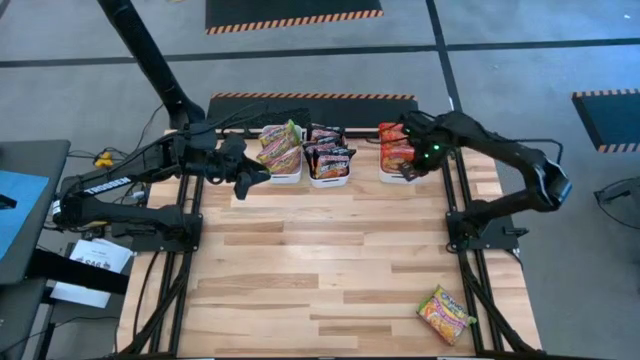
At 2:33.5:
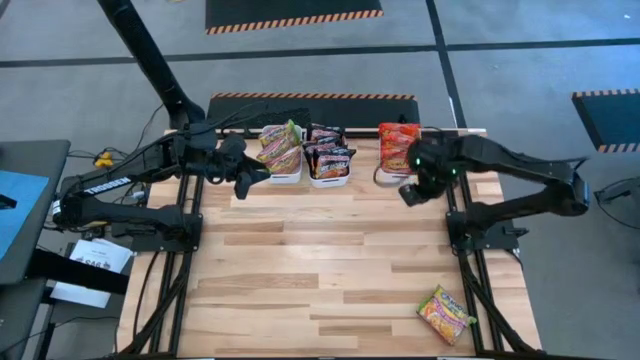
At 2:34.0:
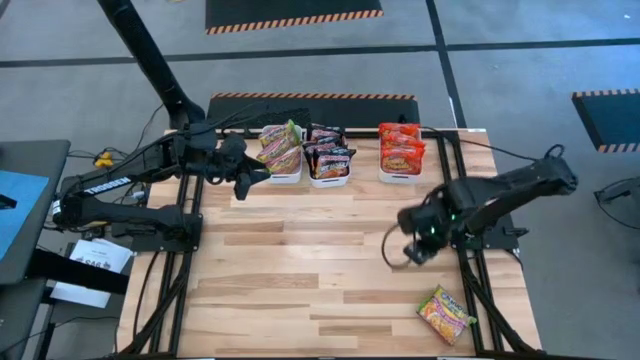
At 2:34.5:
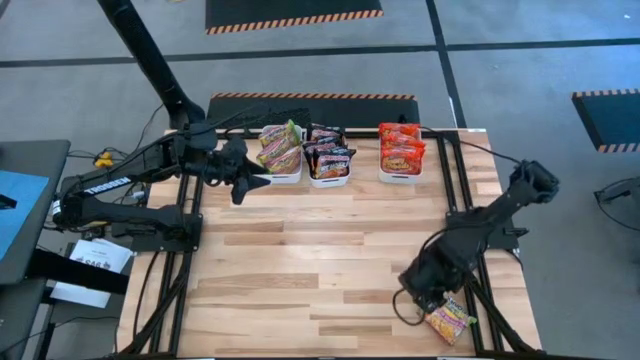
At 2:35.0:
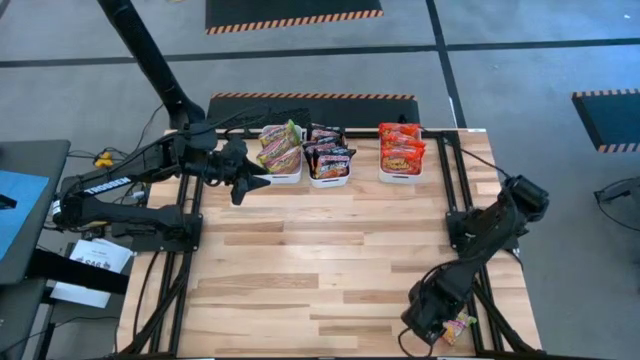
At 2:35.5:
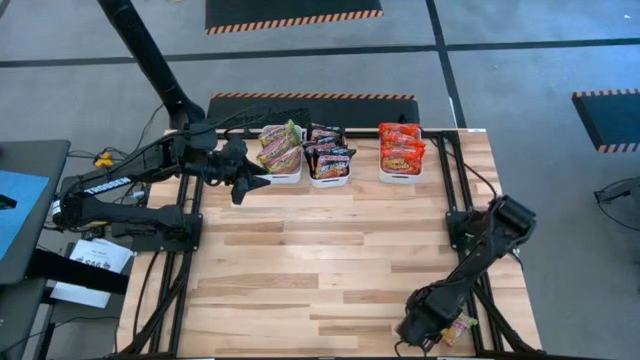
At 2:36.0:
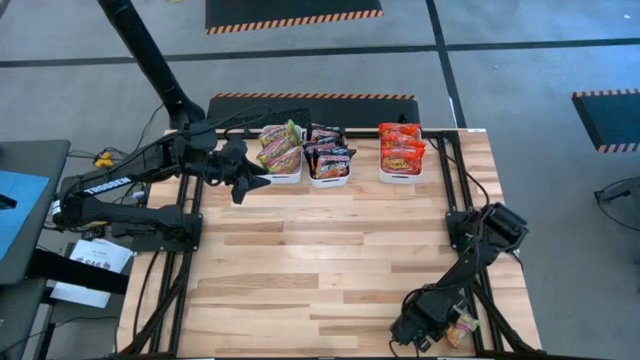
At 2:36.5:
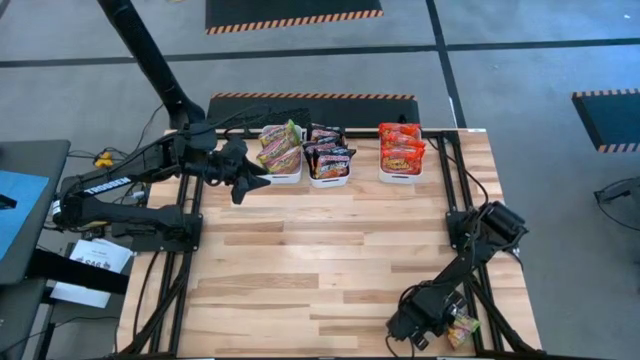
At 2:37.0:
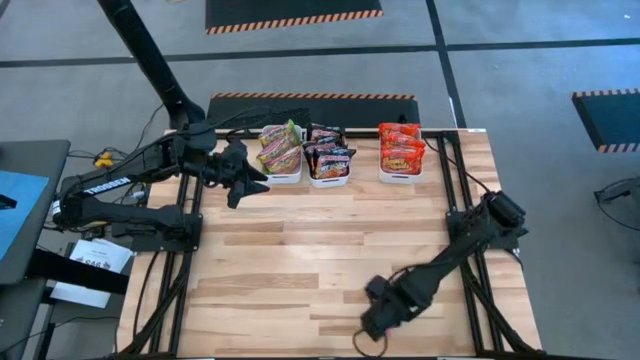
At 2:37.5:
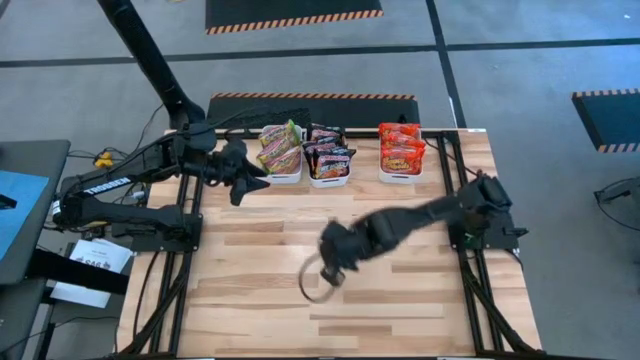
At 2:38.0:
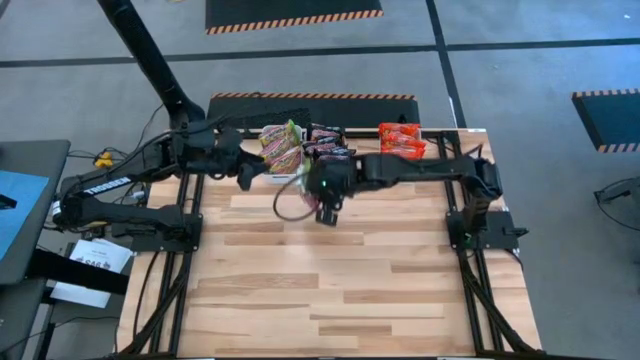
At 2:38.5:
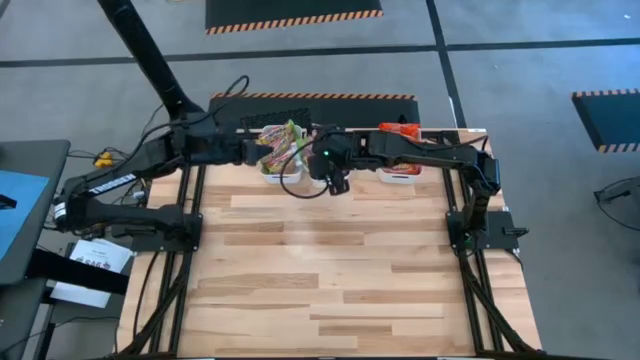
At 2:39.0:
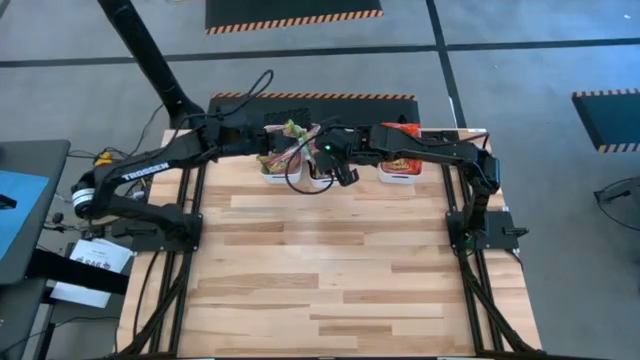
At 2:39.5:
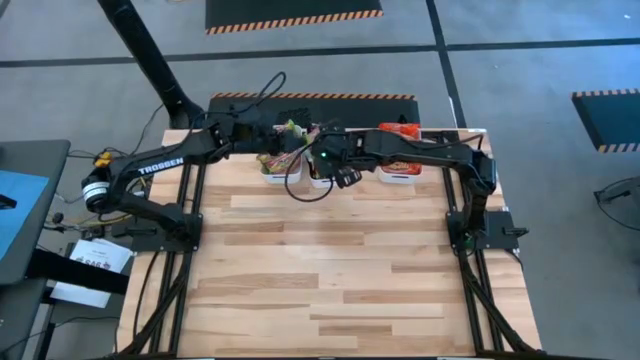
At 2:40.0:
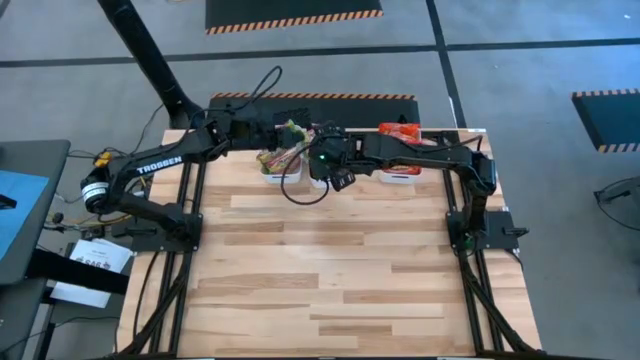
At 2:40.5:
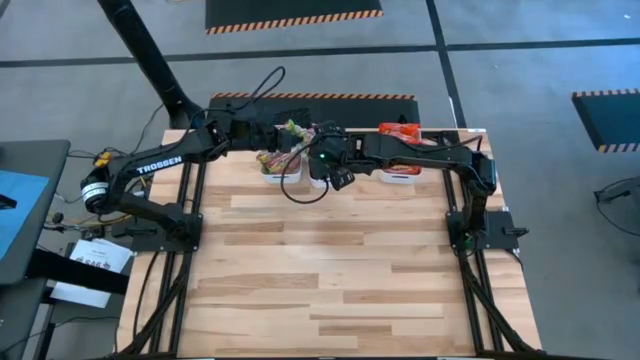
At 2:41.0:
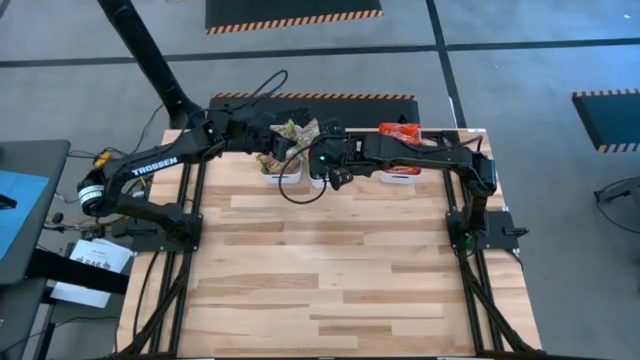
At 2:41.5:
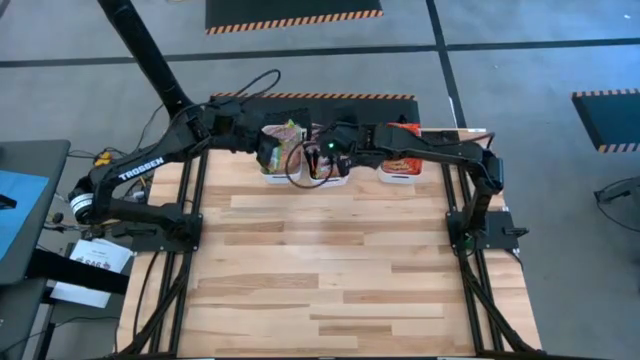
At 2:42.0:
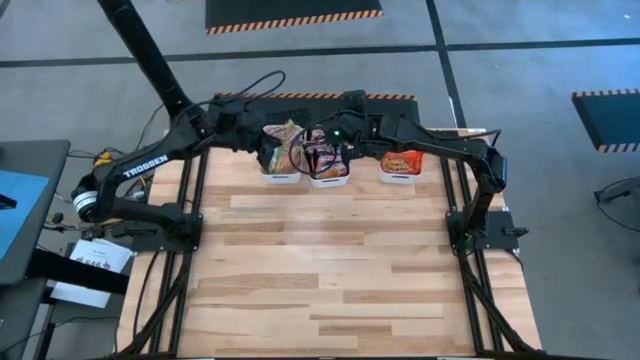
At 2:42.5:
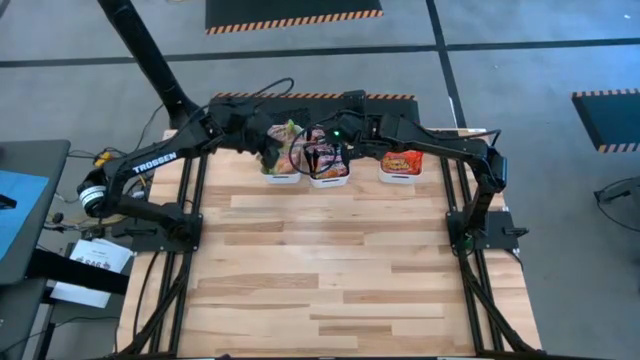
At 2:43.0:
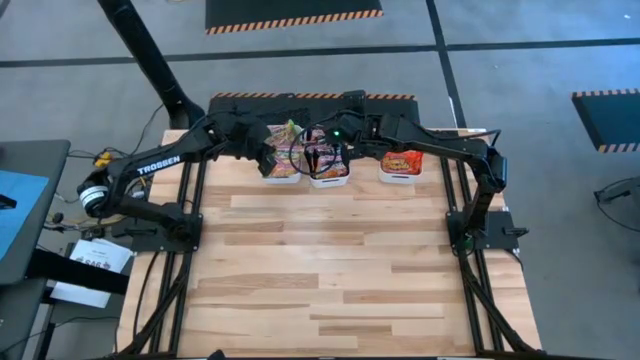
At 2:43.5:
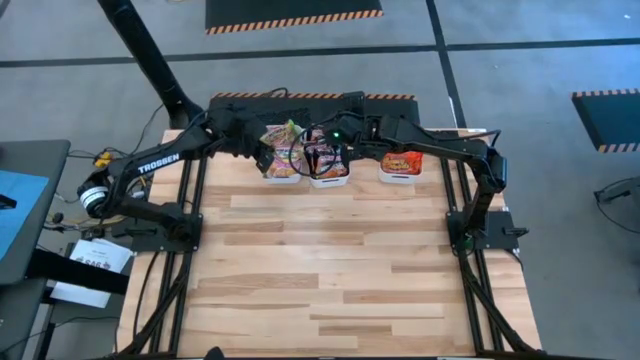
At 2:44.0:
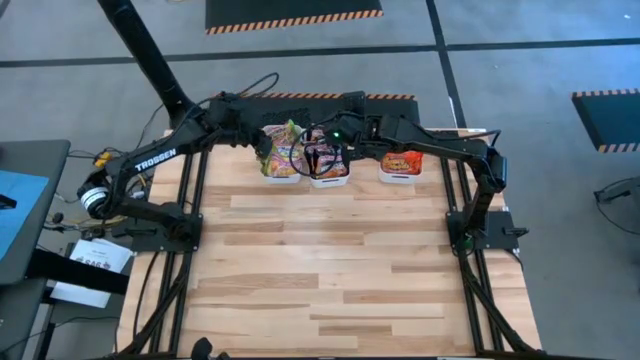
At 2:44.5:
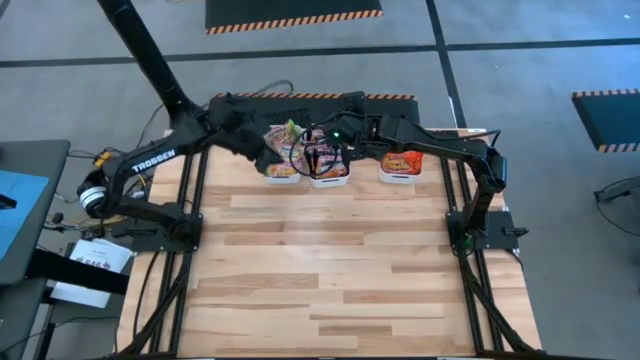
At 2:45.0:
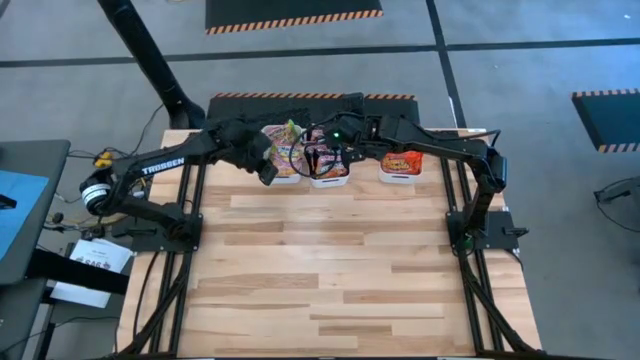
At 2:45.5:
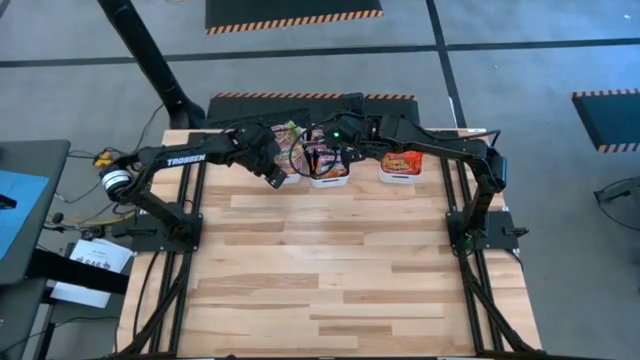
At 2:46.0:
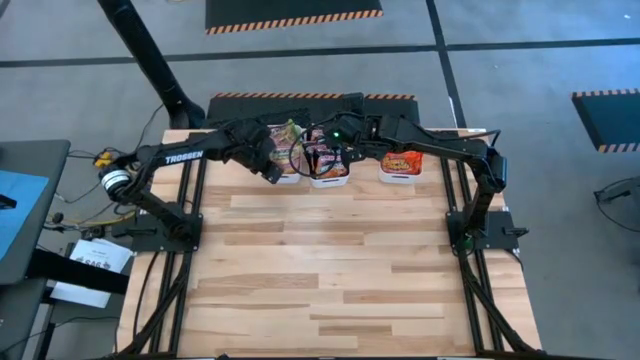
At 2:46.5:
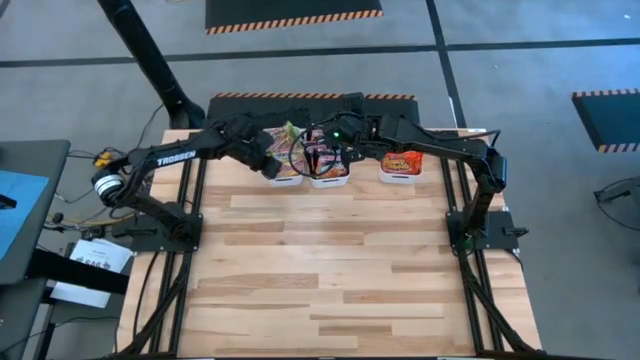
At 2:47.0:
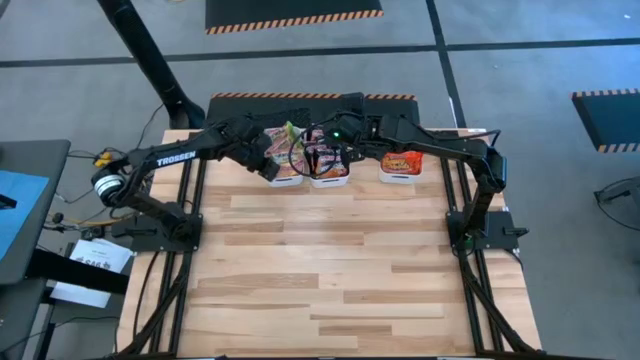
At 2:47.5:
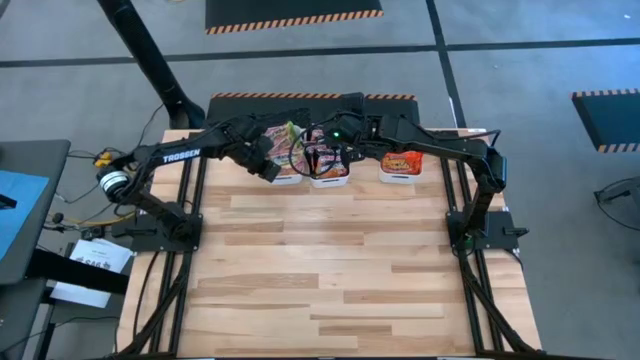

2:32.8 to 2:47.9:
Task: Sort Maruchan noodles
Put the green noodle pack into the left white bin

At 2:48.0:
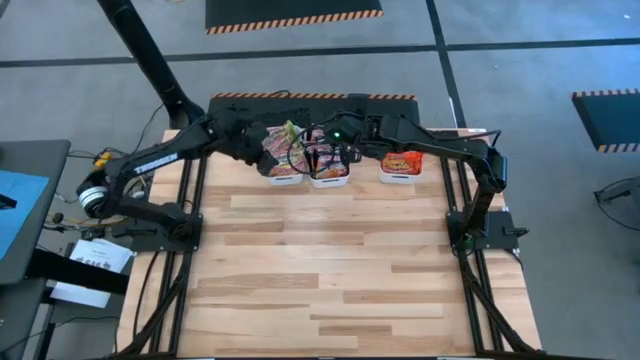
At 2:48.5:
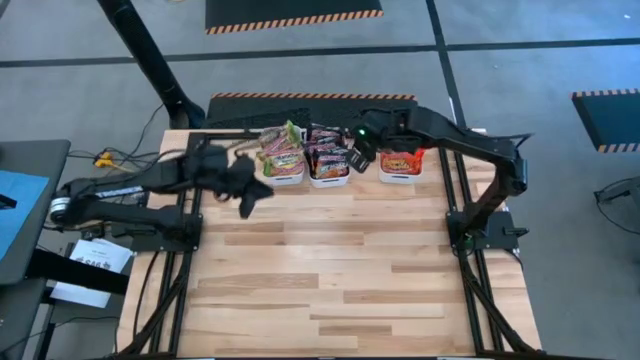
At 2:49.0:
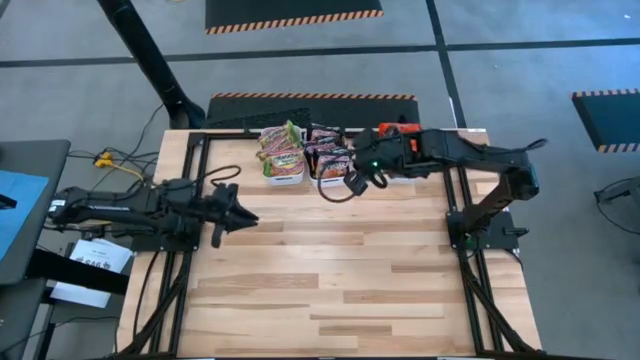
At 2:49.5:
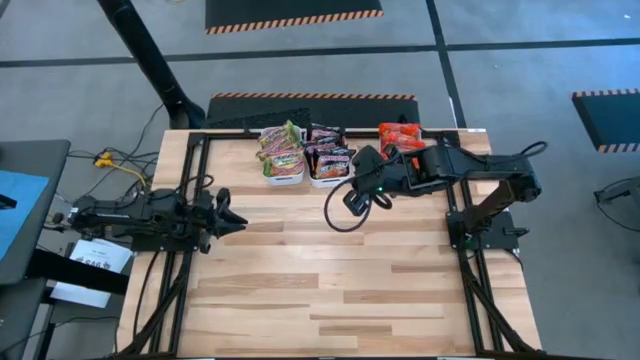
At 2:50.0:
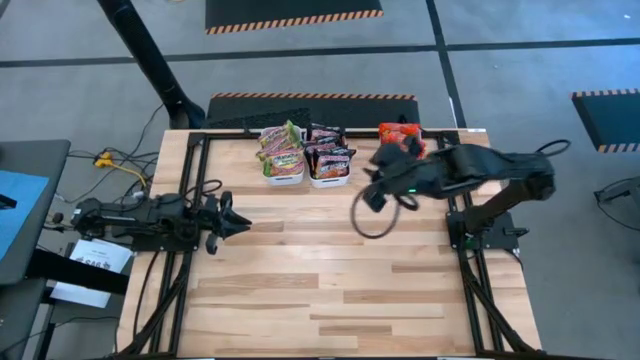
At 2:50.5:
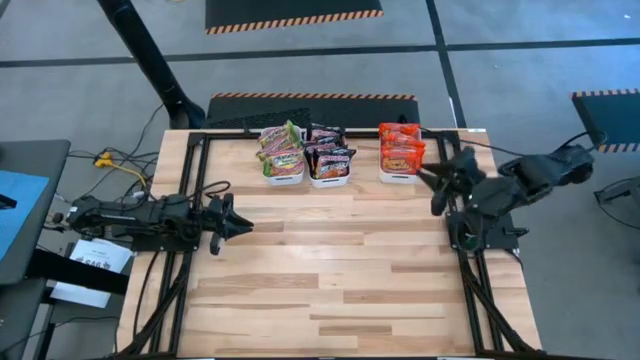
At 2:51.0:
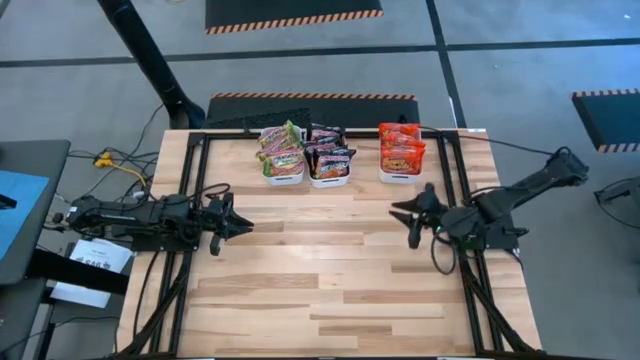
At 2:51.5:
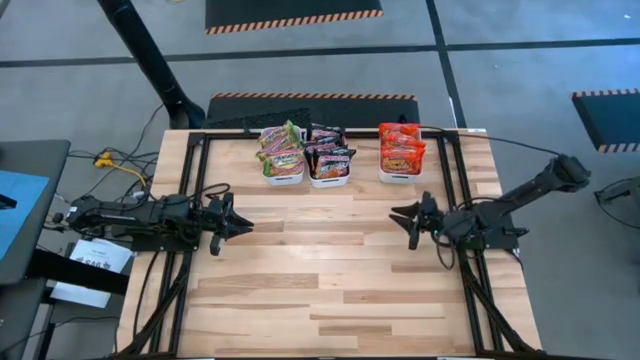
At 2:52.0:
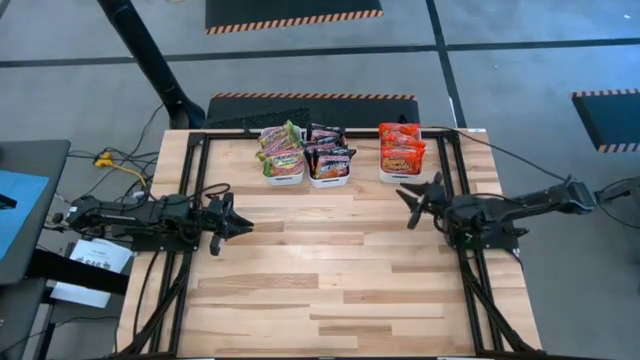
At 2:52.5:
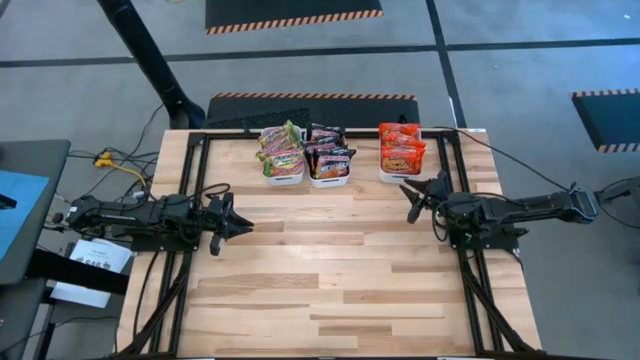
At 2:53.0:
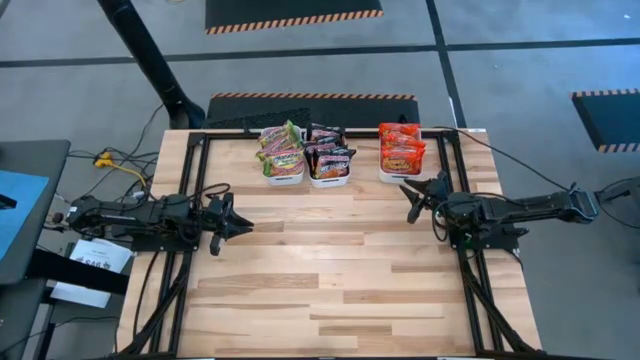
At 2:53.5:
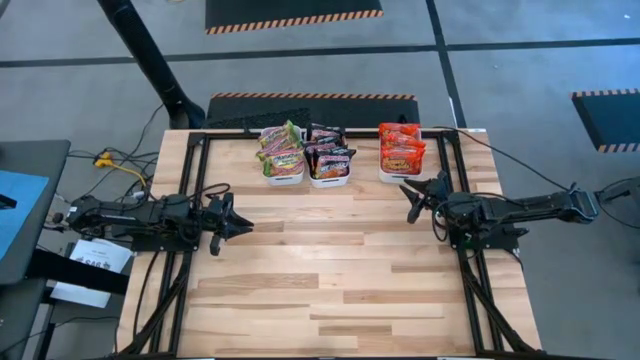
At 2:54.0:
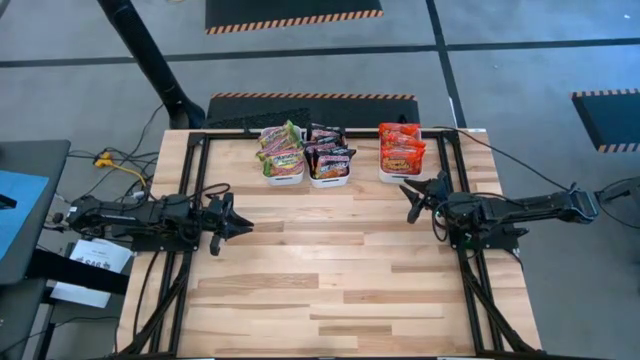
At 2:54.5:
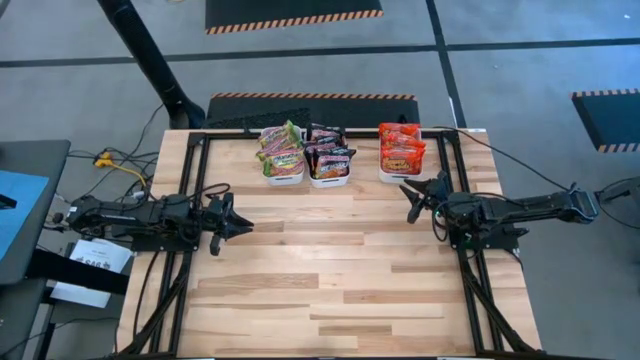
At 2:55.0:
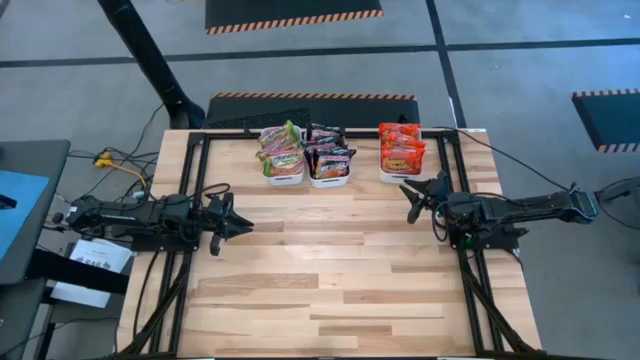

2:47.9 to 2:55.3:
Return to Home Position
